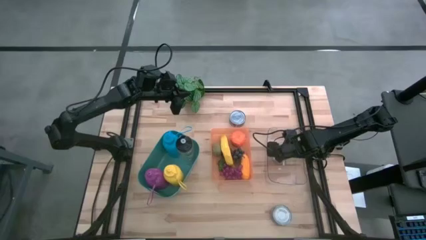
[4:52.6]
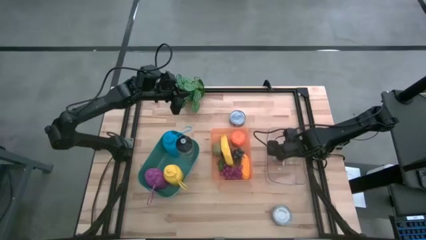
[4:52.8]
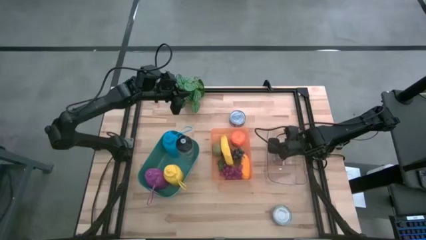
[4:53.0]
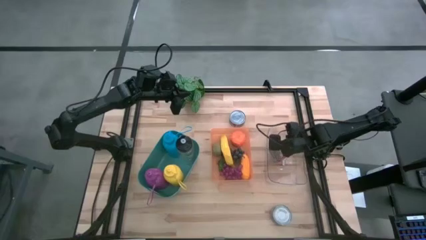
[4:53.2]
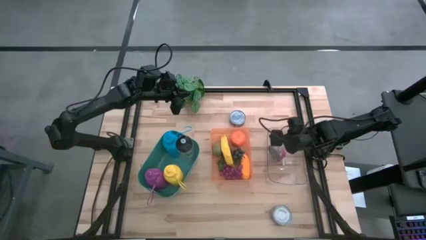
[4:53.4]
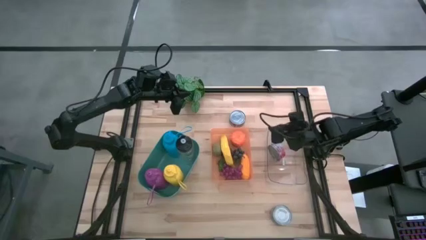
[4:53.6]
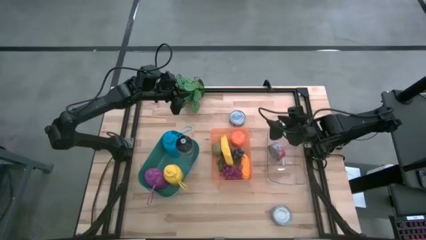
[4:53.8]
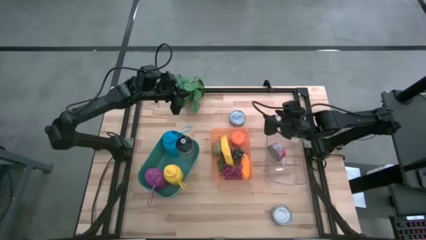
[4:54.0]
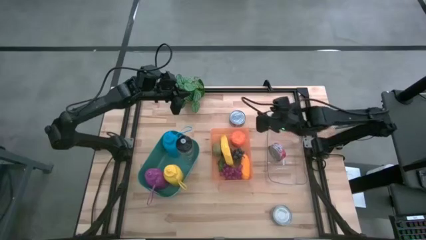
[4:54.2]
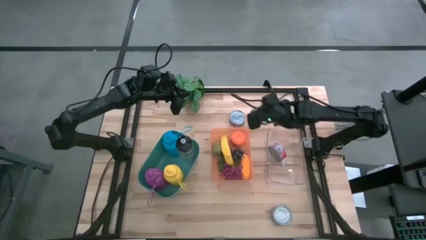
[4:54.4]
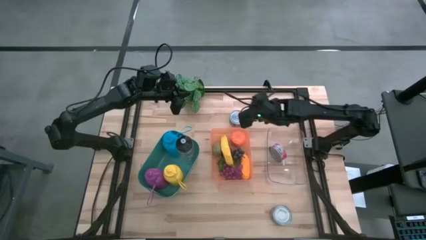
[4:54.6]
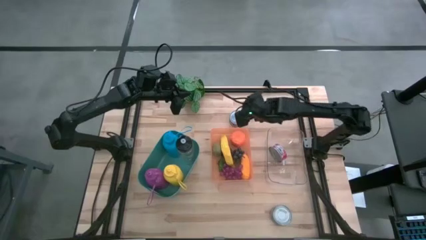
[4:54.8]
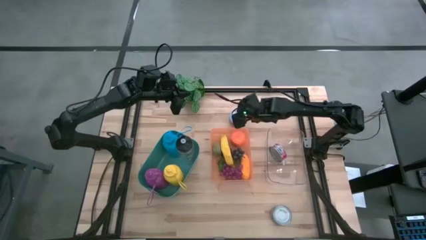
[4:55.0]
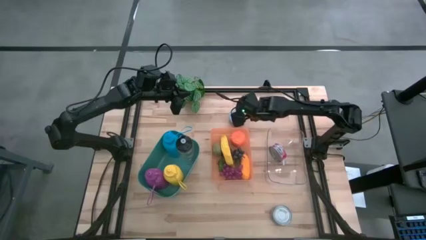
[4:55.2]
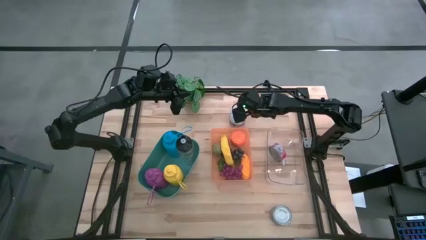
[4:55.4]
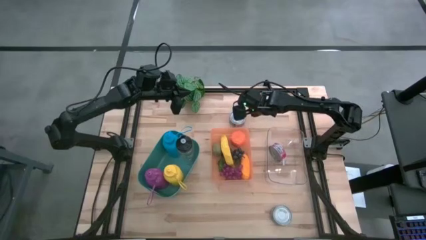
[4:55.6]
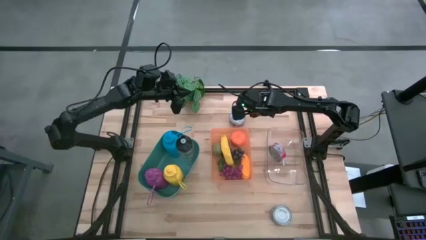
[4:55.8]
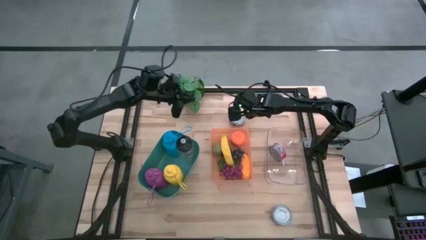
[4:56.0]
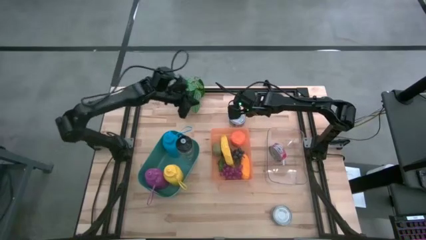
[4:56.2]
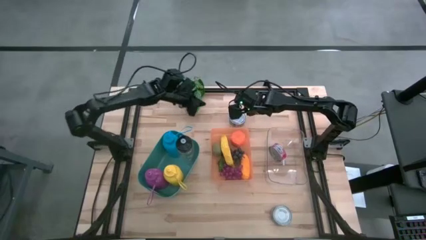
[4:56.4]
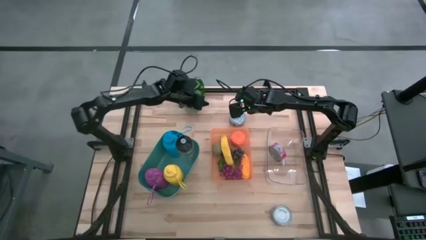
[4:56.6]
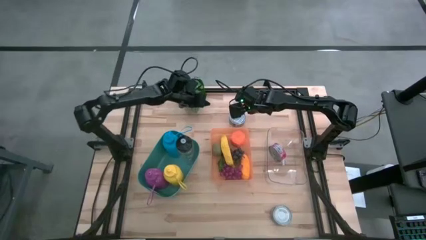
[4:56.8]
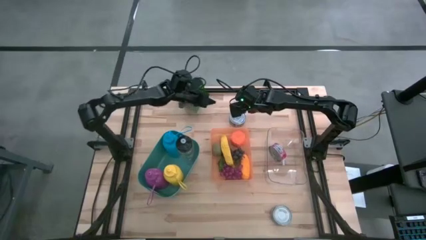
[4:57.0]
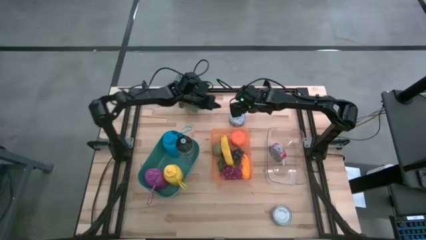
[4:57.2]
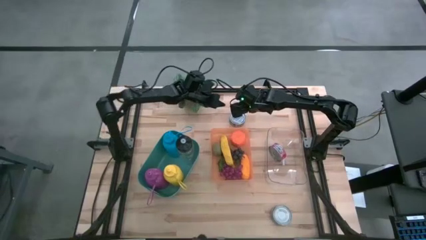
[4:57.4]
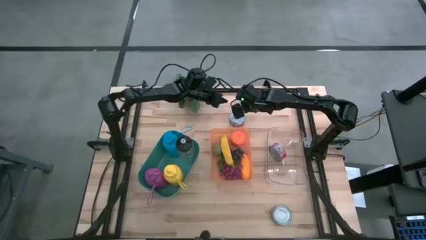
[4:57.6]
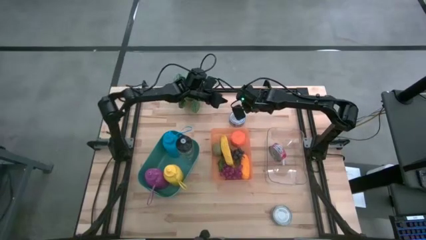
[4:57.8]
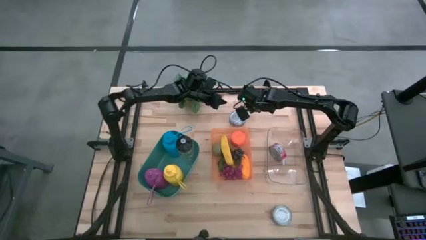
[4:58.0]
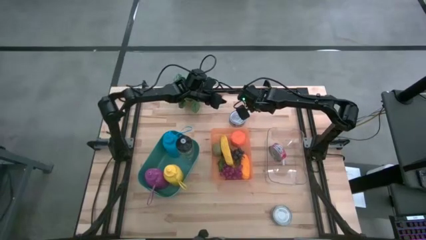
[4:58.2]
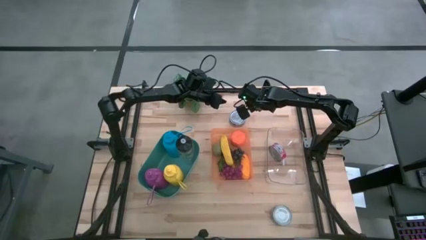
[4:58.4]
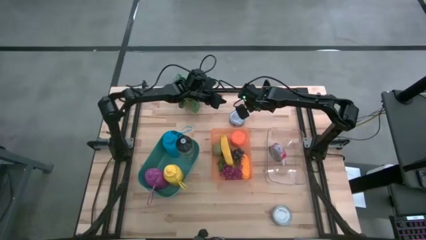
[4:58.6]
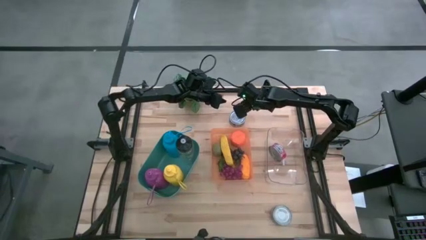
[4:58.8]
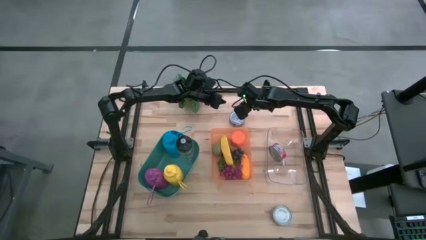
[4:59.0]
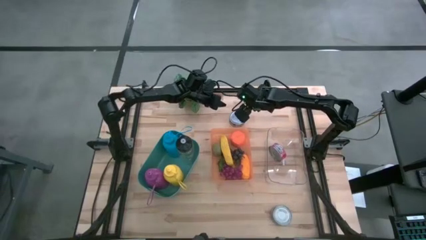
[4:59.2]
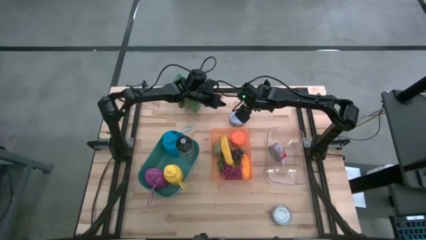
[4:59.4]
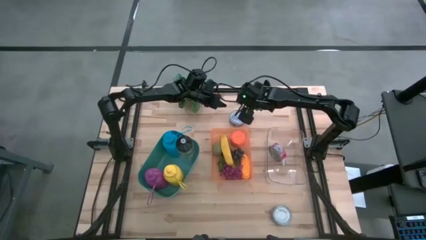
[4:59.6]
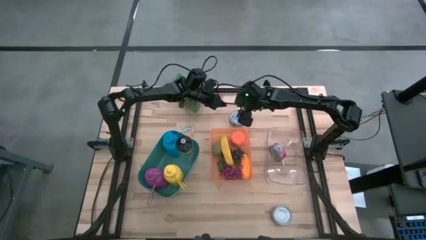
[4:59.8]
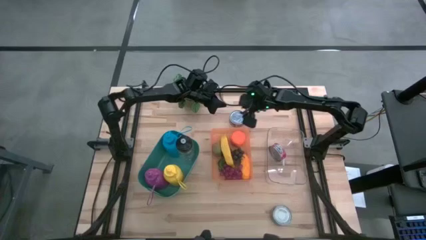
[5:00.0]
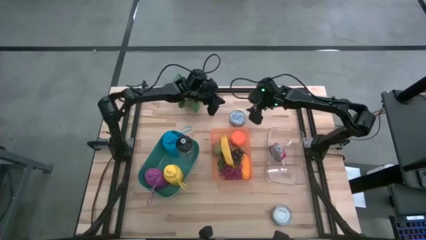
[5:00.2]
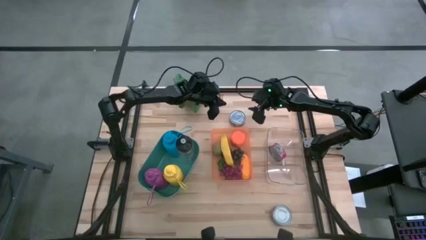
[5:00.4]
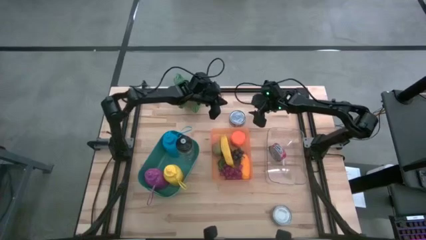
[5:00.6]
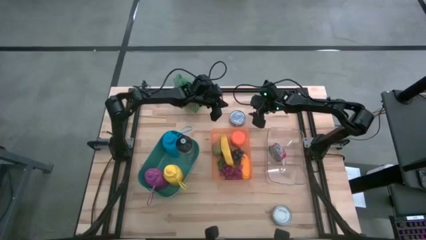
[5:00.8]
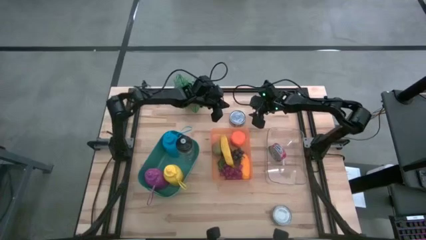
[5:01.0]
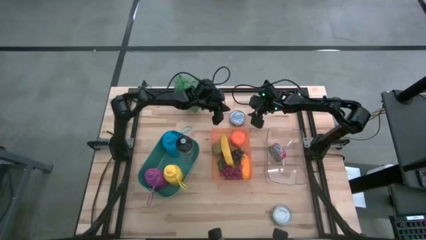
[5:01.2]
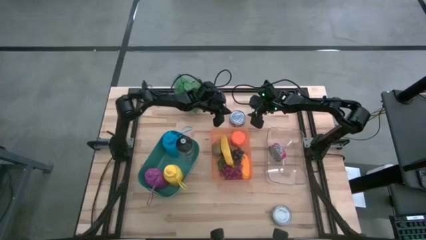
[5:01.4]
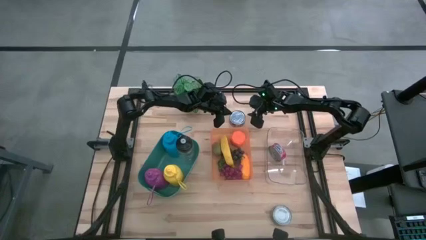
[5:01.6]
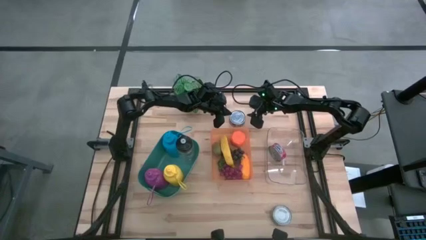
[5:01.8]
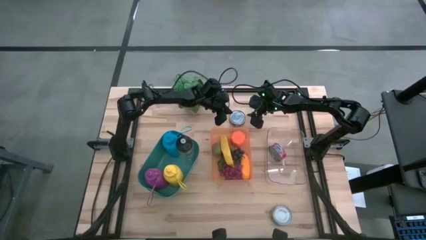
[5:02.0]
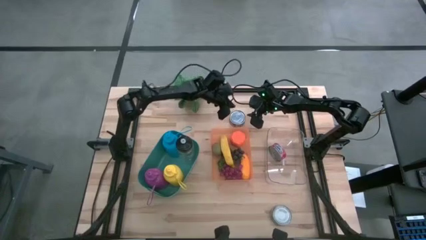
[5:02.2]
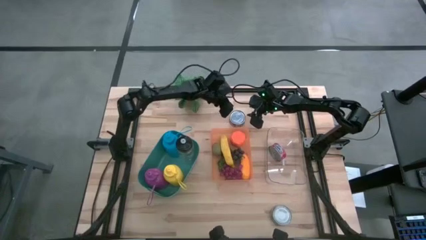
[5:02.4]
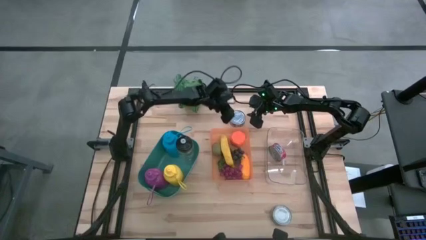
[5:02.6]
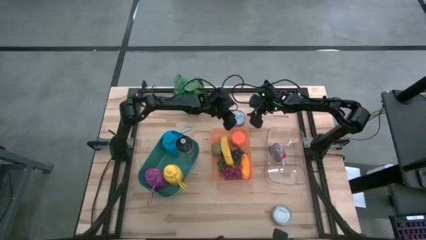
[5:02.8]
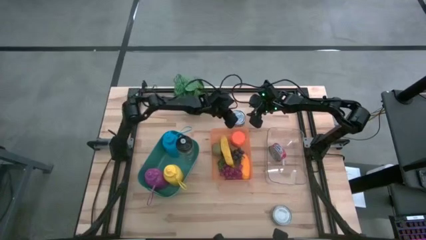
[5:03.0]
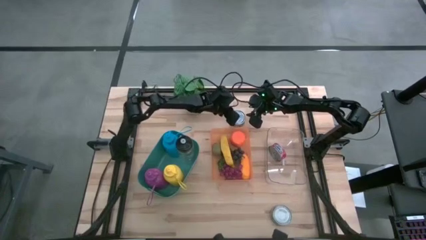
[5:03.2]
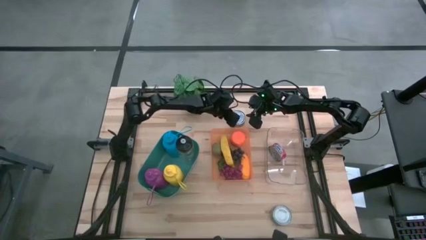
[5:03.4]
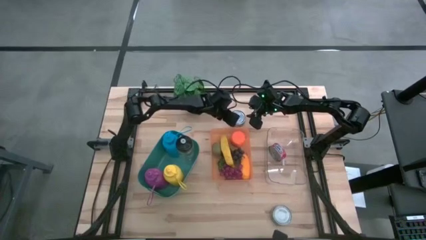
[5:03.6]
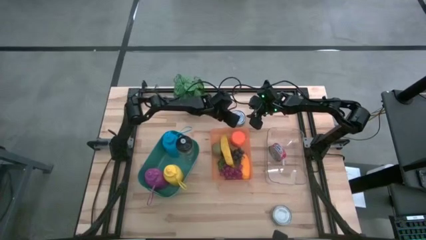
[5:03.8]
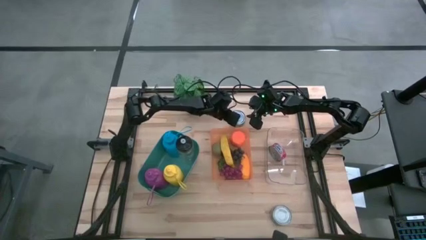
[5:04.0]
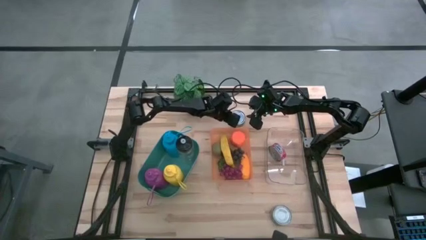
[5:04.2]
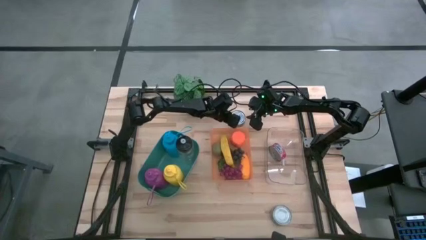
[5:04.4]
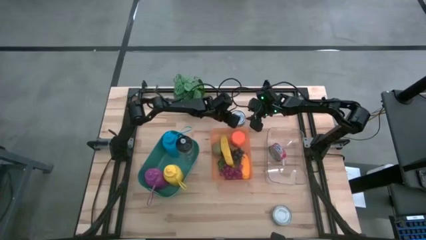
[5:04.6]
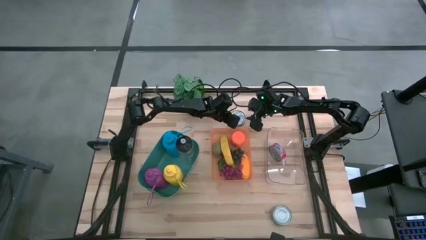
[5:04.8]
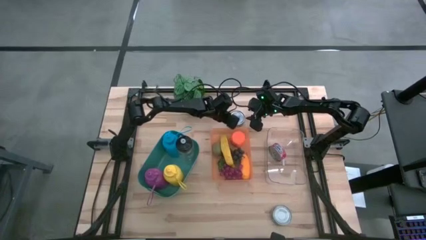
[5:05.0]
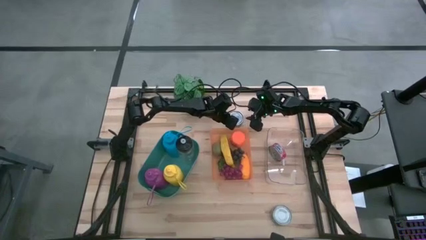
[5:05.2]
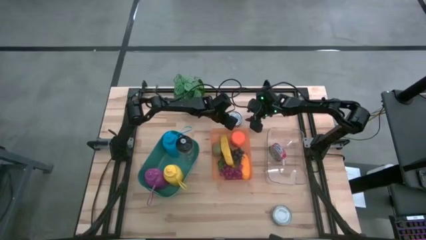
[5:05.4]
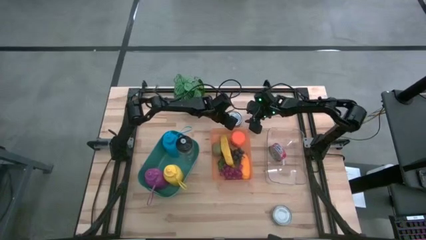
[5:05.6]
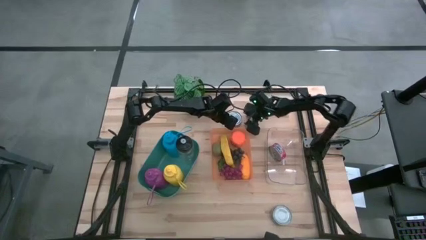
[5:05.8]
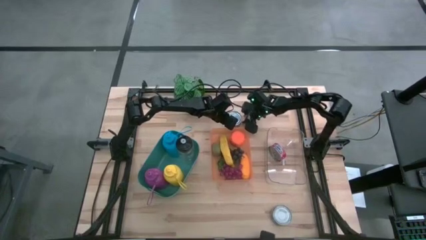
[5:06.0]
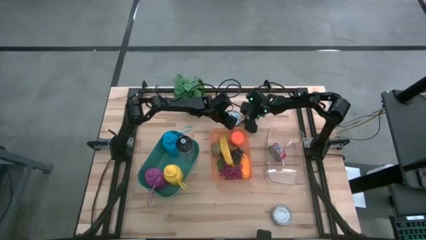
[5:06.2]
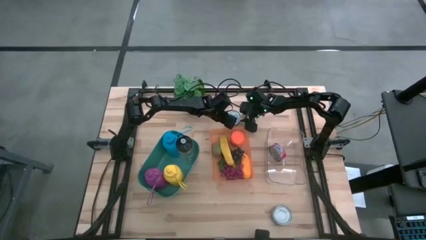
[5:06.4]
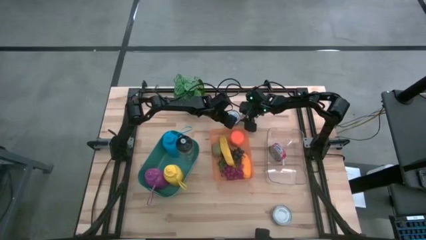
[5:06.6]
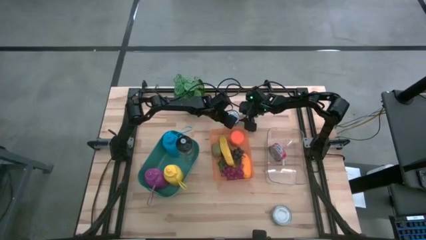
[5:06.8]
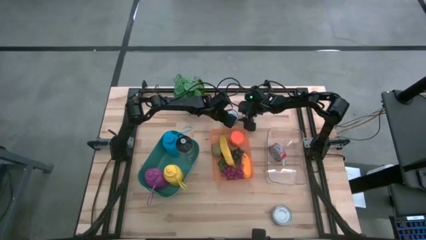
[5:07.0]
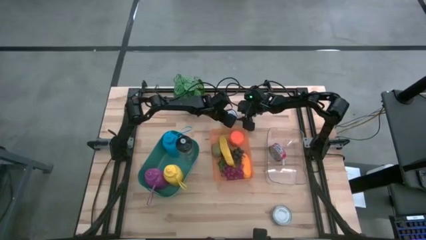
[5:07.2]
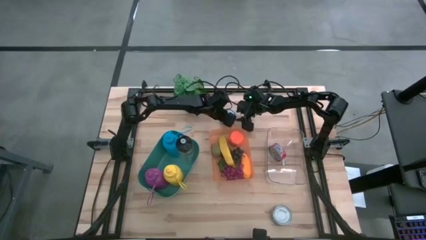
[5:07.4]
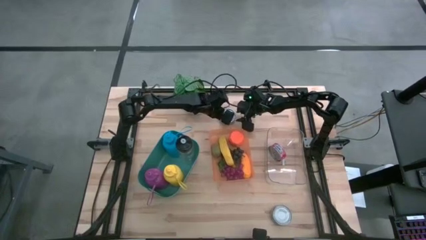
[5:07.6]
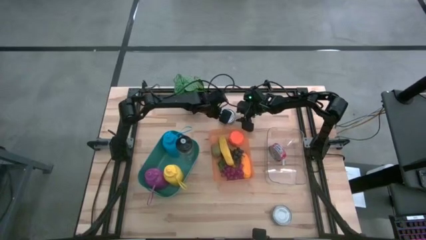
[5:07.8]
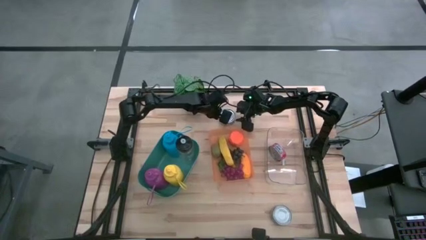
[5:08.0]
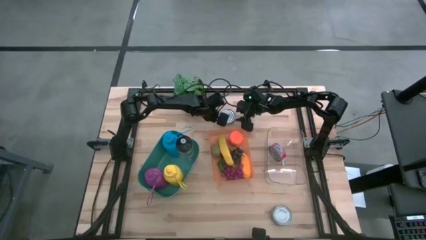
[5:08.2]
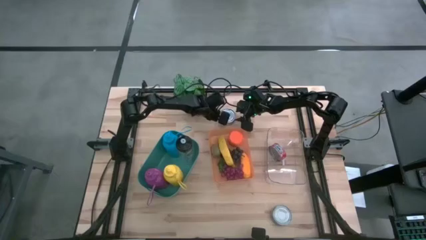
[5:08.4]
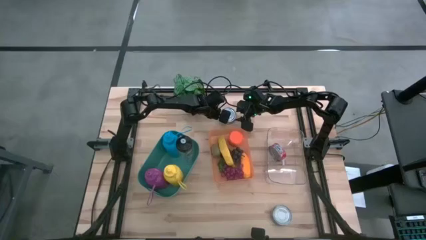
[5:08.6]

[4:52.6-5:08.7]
Task: Pick & Place Food Item
Put the top green tuna can into the transparent bin
